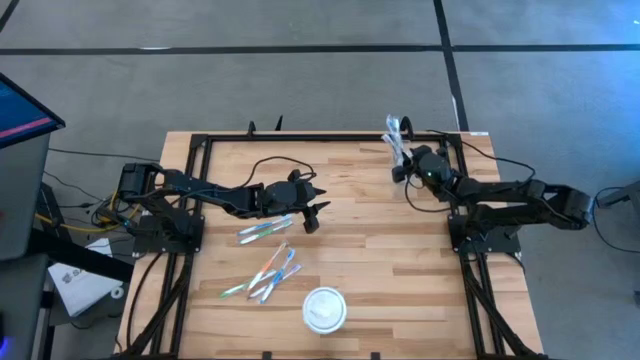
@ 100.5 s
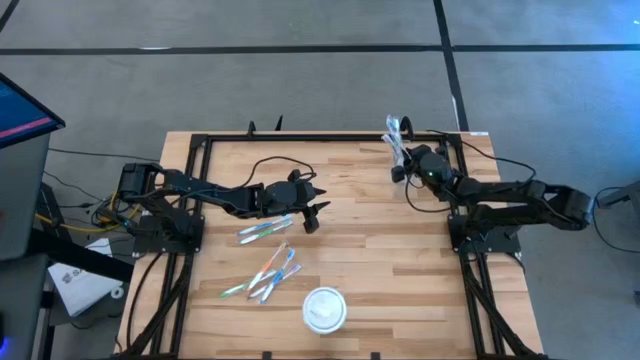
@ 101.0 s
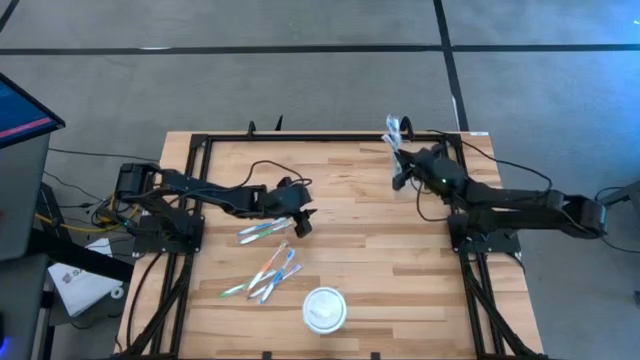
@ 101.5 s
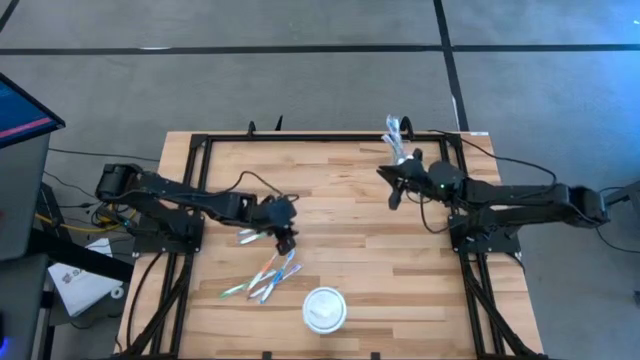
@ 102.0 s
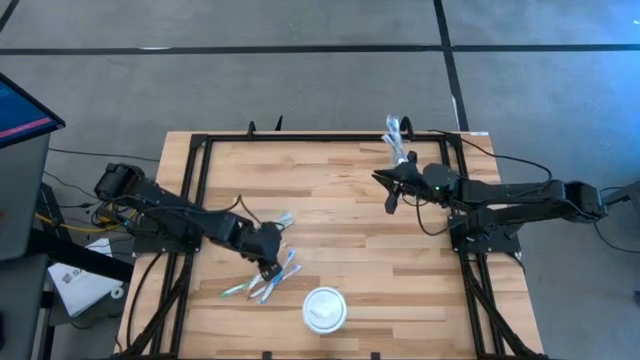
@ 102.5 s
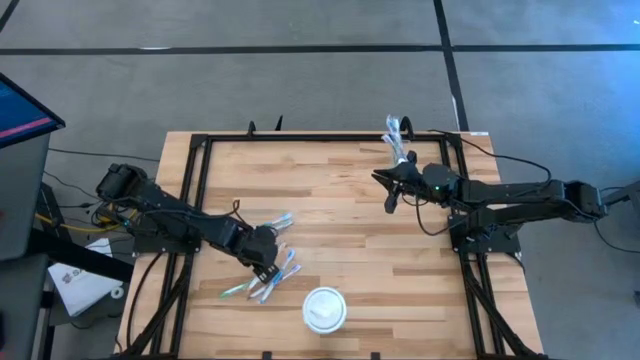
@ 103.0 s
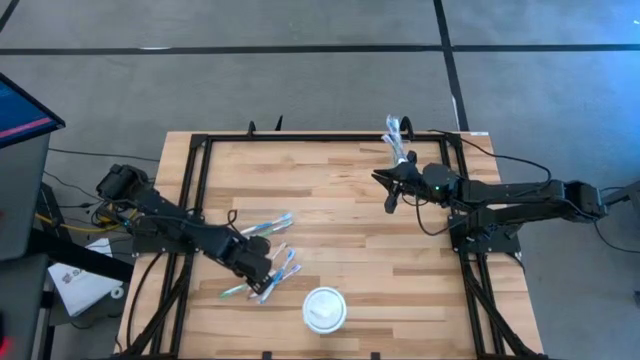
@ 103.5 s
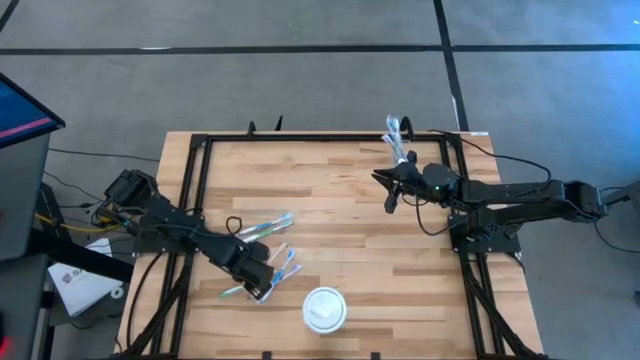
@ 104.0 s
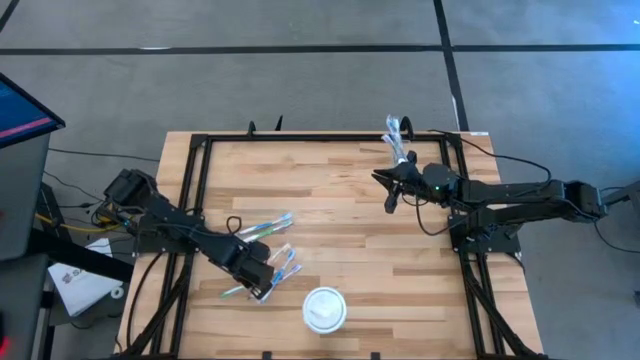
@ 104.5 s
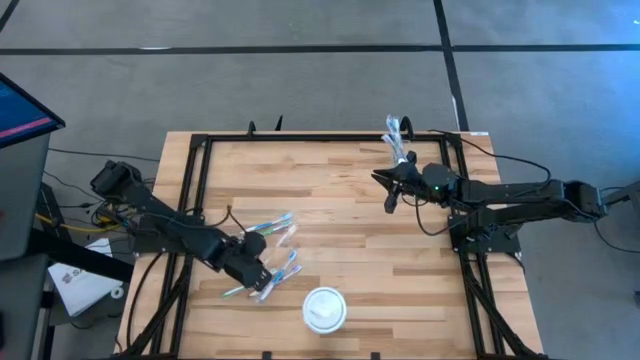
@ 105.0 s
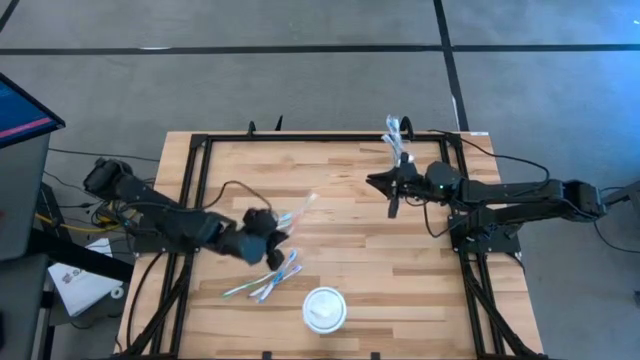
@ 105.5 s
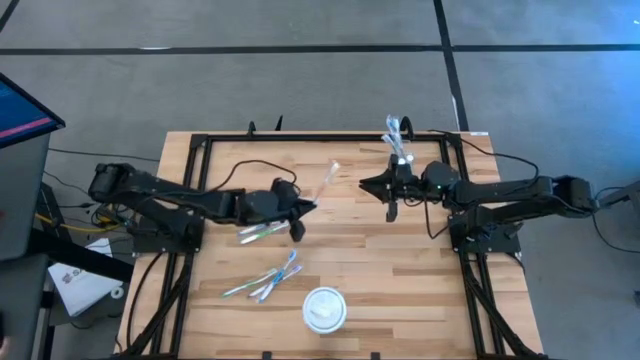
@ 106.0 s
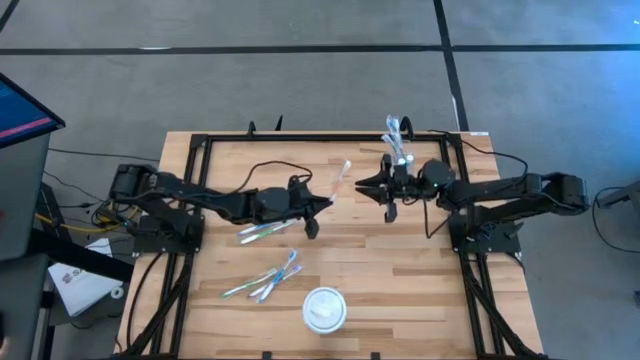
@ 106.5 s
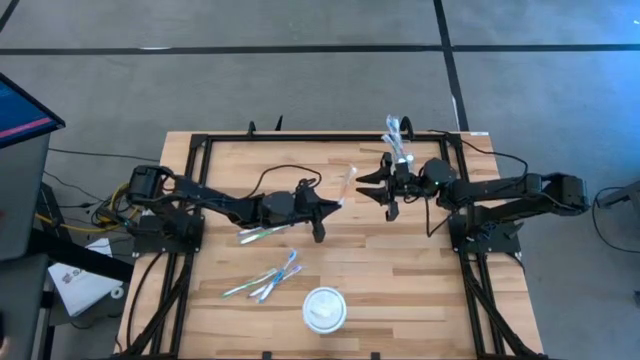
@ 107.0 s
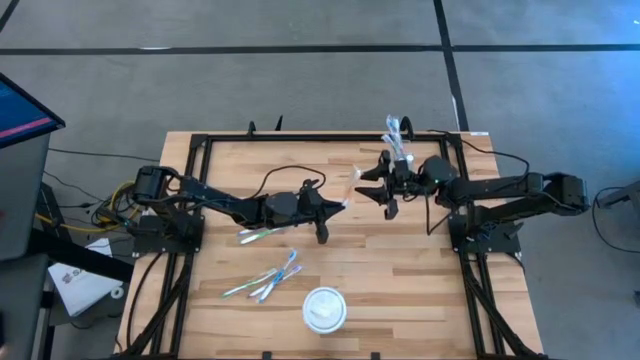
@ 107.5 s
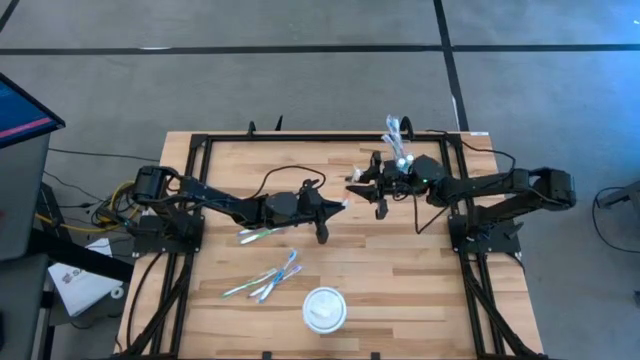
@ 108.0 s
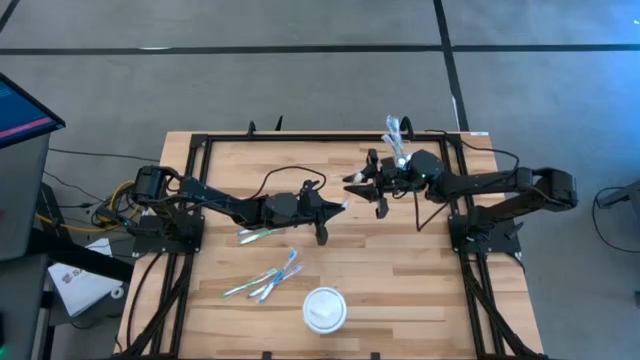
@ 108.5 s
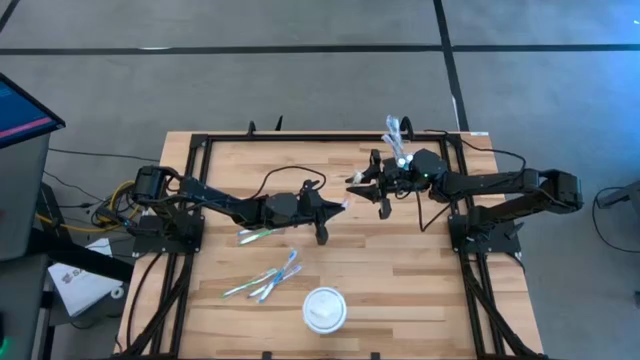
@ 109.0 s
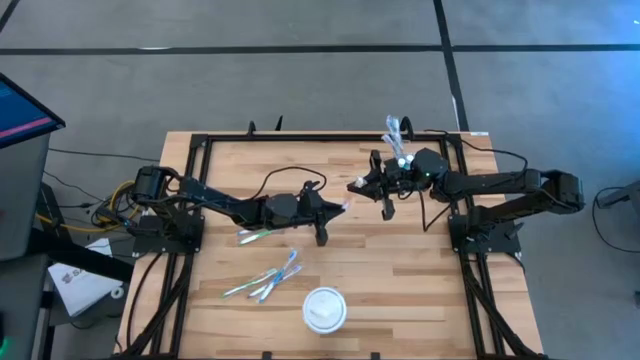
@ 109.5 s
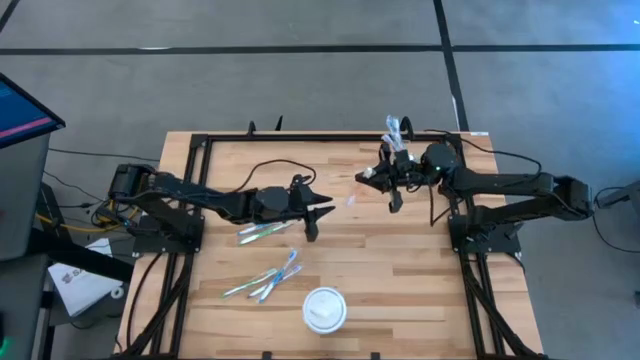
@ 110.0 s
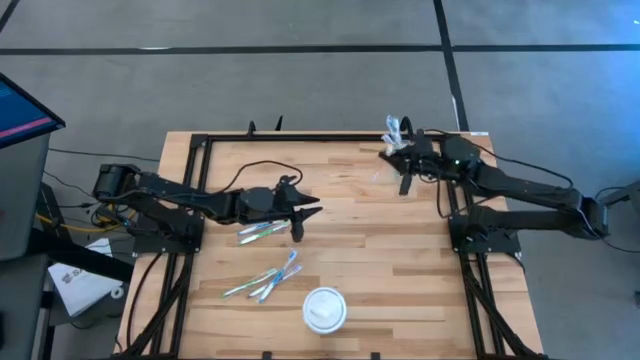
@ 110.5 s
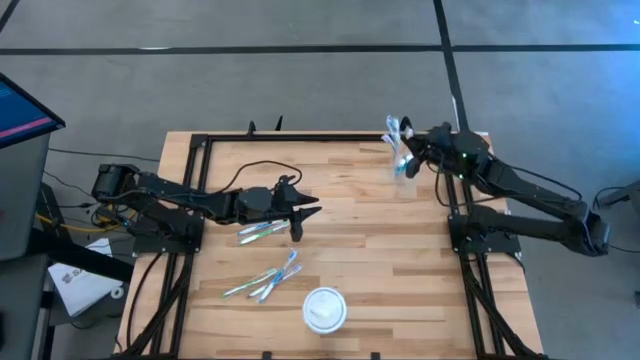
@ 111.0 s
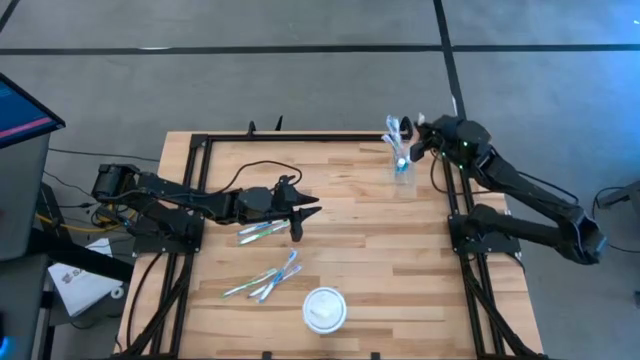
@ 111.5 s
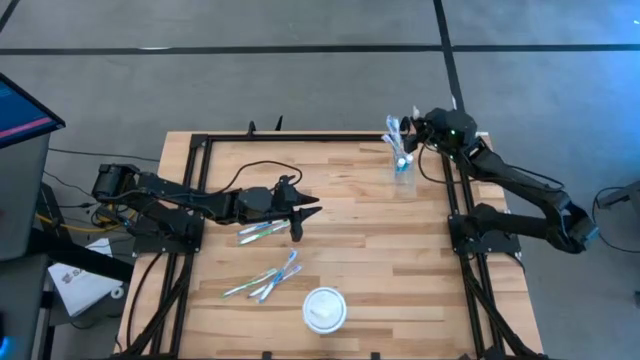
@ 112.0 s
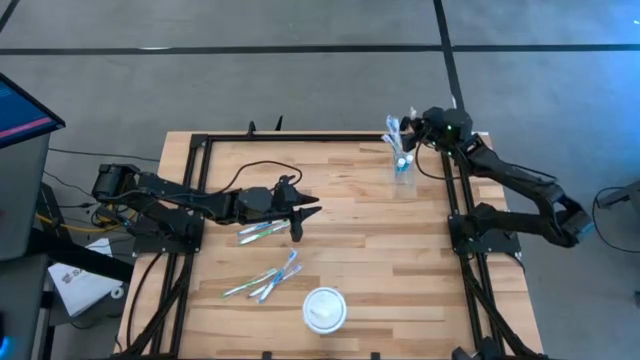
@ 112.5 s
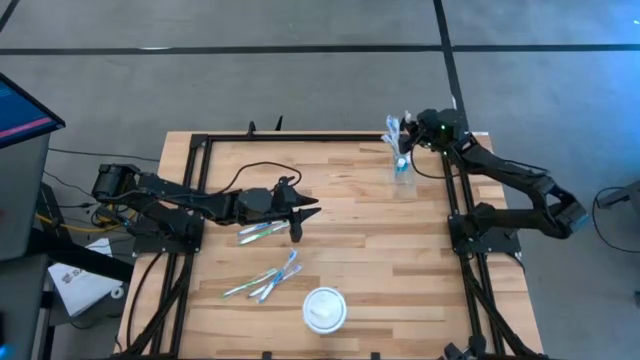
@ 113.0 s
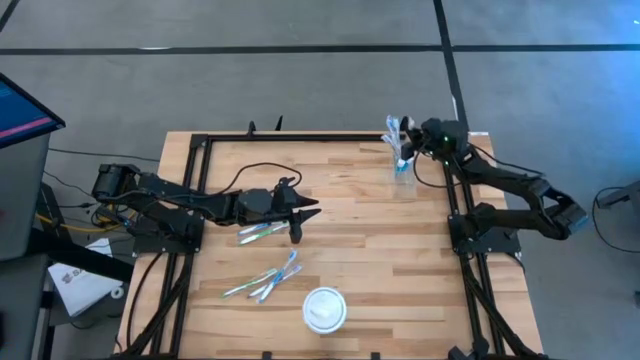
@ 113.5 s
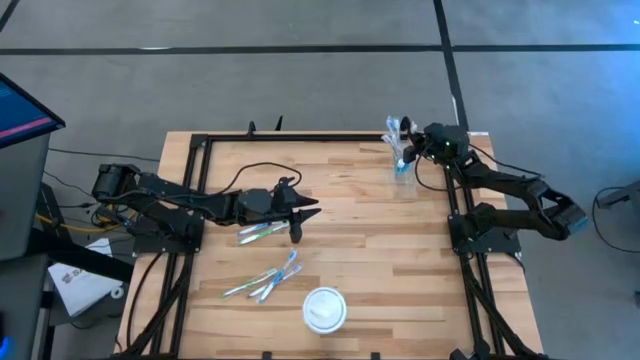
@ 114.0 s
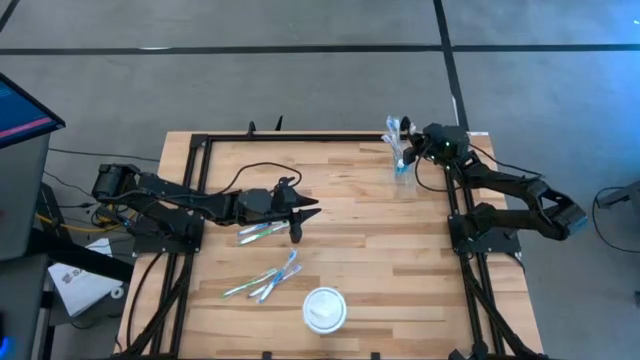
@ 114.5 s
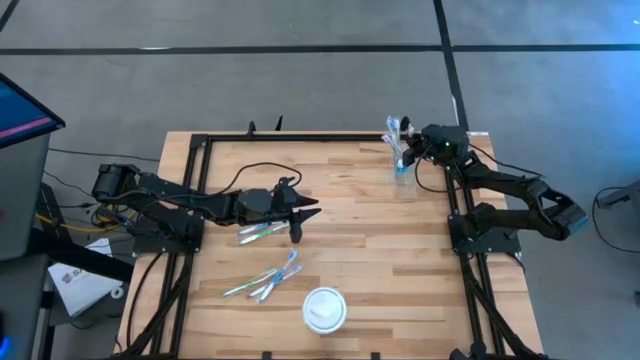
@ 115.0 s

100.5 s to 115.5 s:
Task: Pick & Place toothbrushing station
Put the orange toothbrush into the transparent organizer

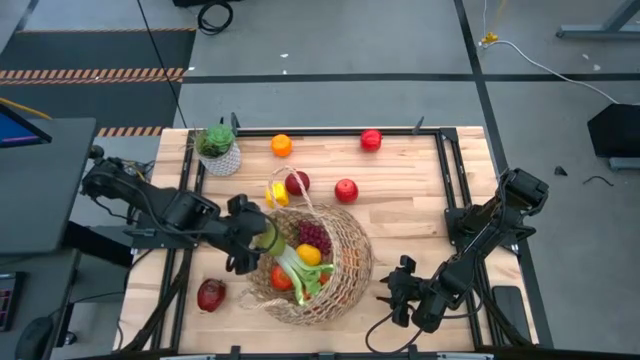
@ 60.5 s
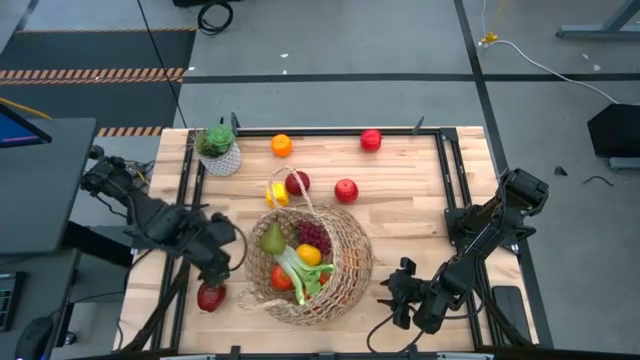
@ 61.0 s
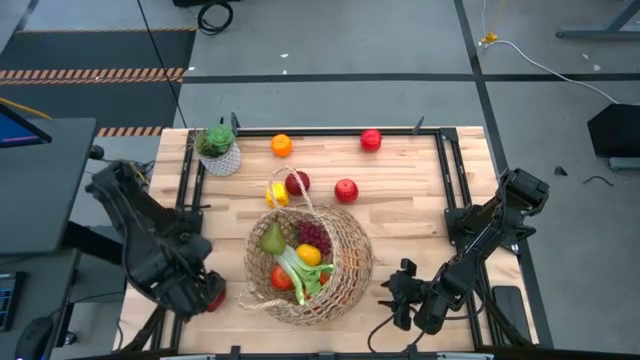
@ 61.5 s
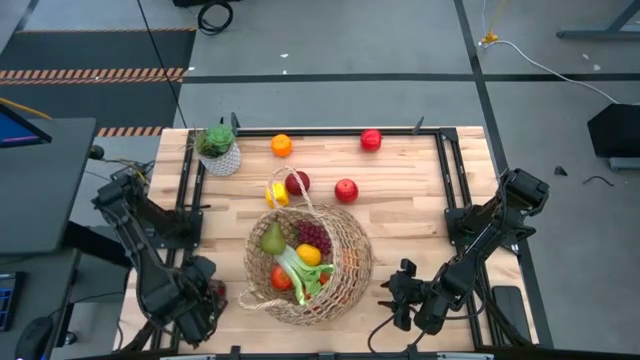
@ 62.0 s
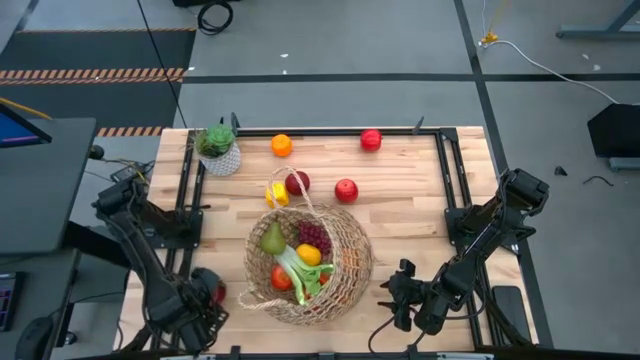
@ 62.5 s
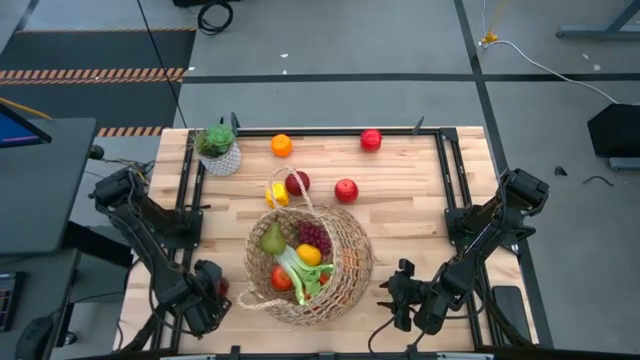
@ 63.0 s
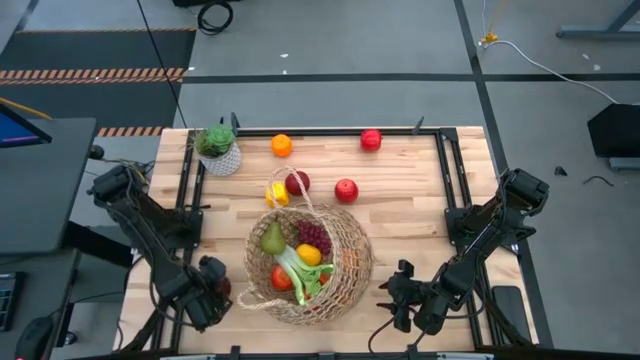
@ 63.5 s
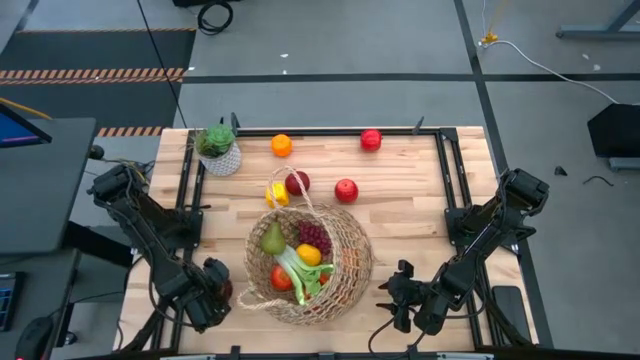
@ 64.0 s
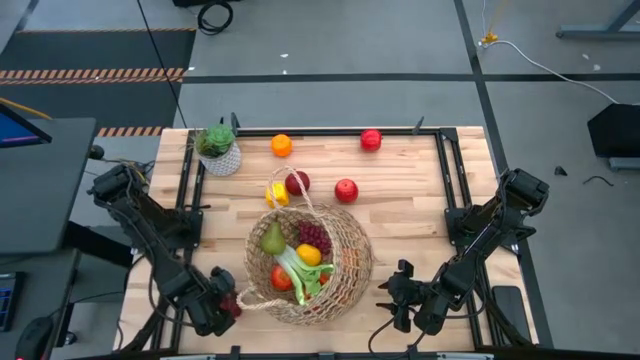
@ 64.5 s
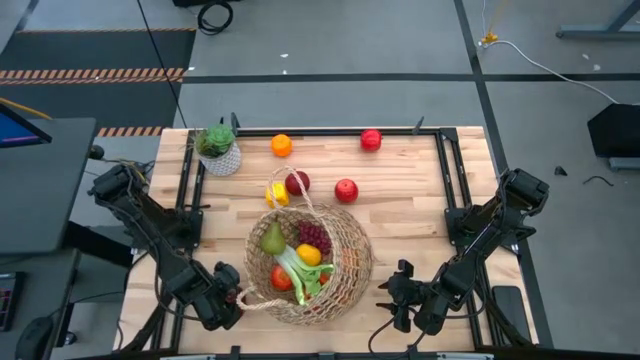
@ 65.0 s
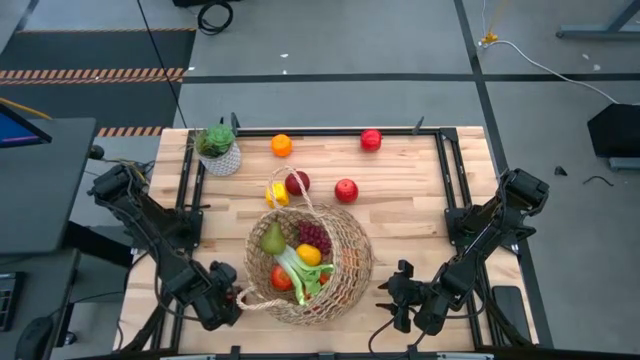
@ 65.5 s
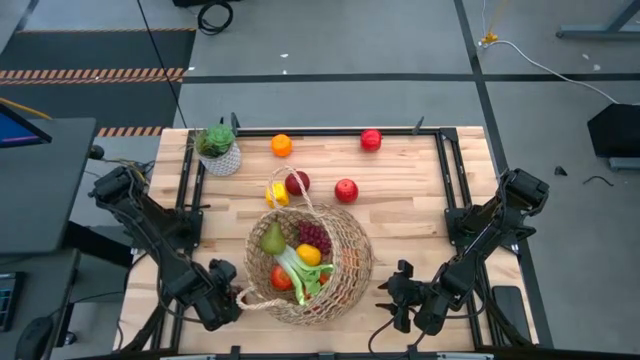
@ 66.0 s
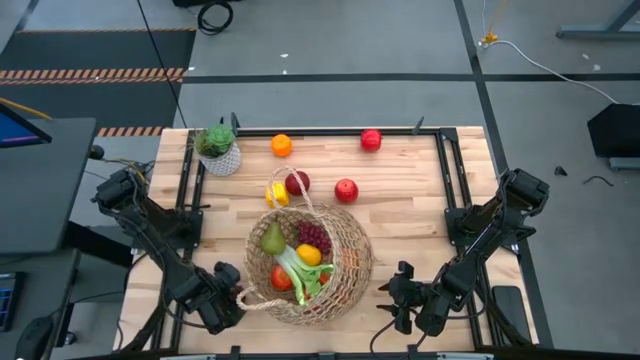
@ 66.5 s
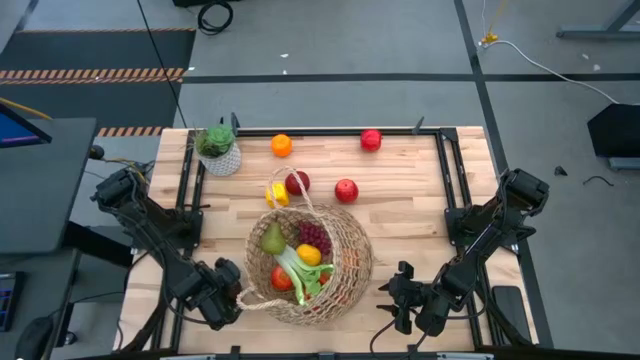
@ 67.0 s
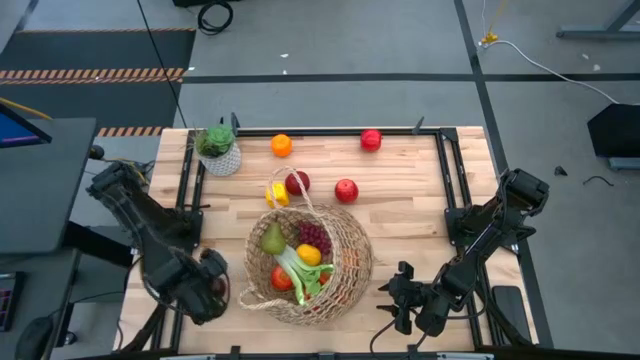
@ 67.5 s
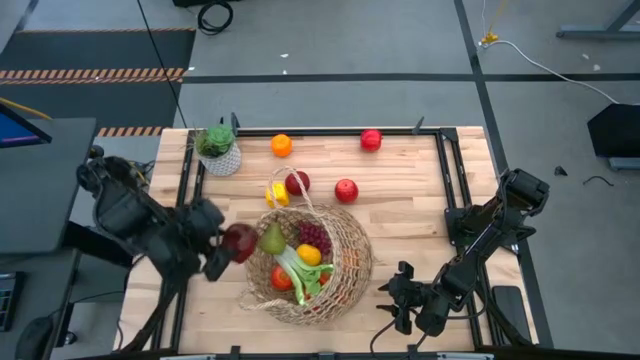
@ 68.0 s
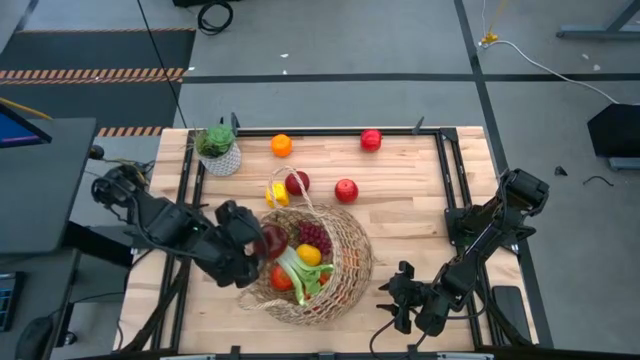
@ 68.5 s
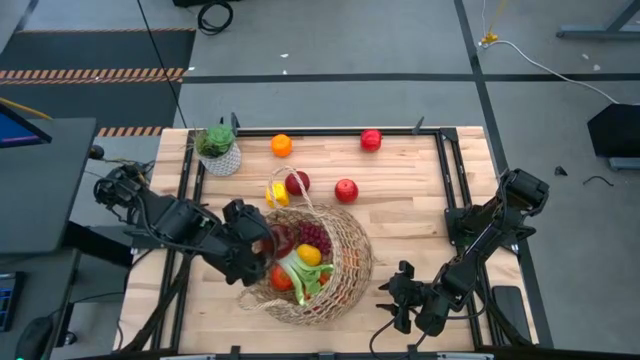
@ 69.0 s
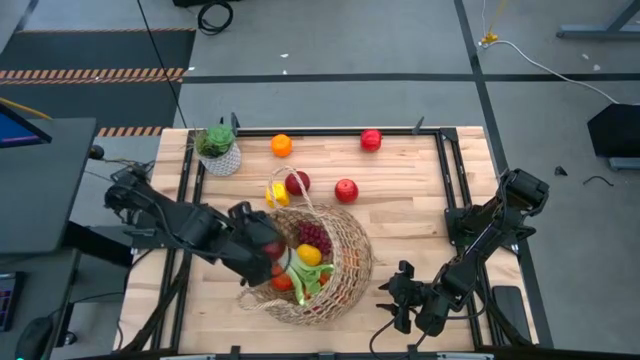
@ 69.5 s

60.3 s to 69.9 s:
Task: Build produce basket
Put the apple into the basket
